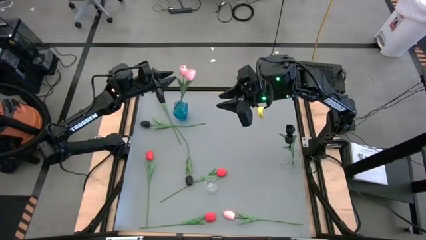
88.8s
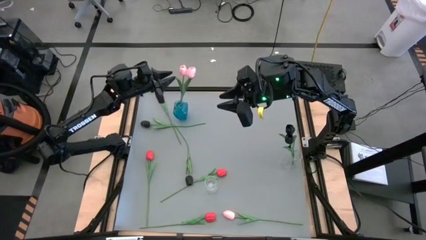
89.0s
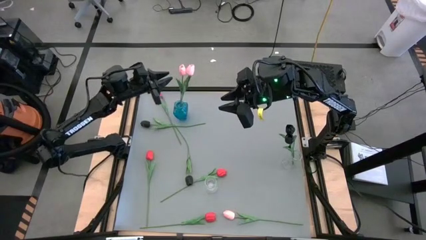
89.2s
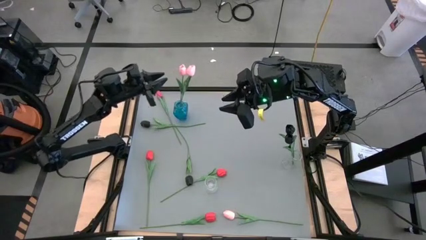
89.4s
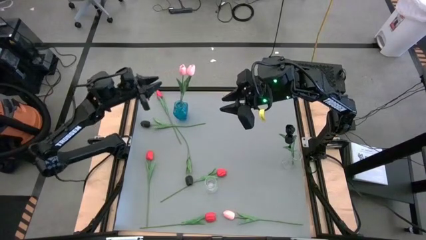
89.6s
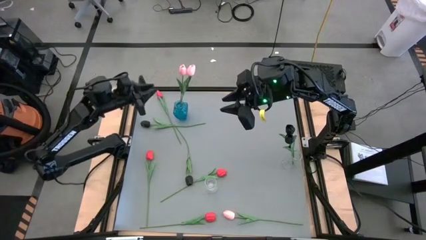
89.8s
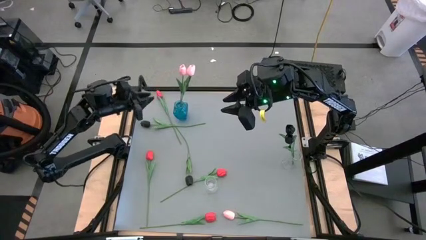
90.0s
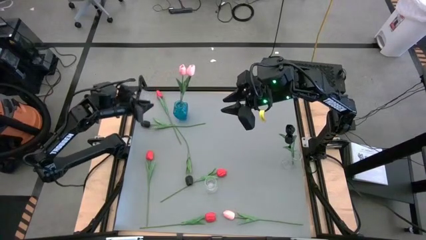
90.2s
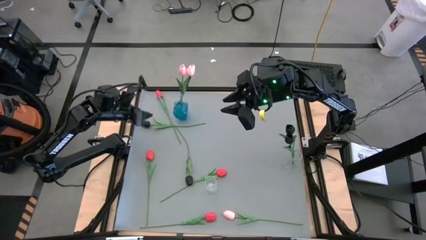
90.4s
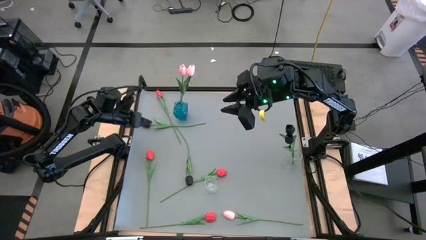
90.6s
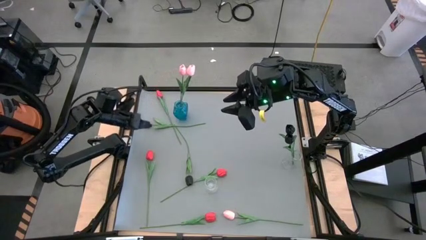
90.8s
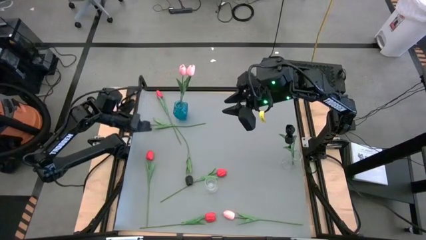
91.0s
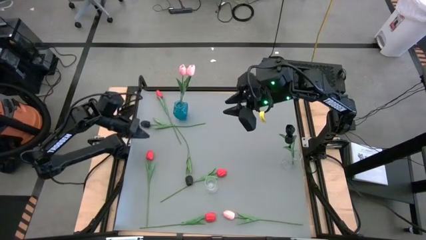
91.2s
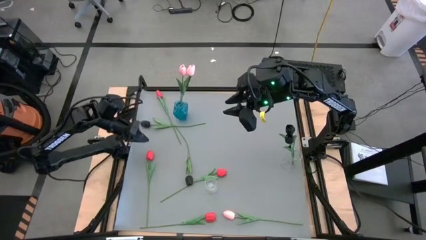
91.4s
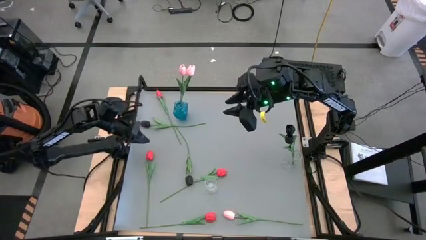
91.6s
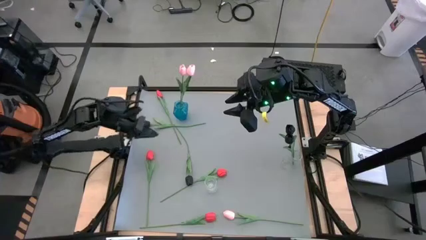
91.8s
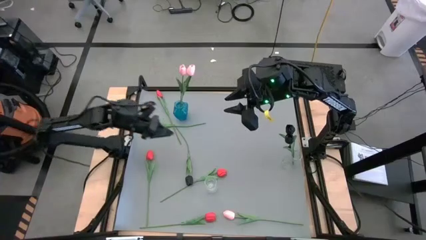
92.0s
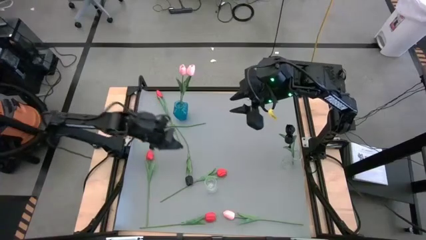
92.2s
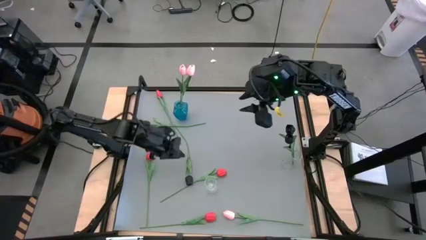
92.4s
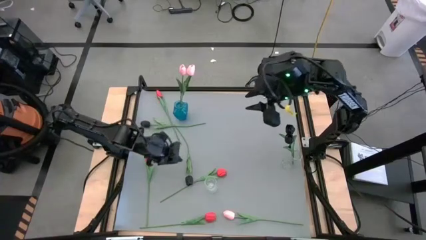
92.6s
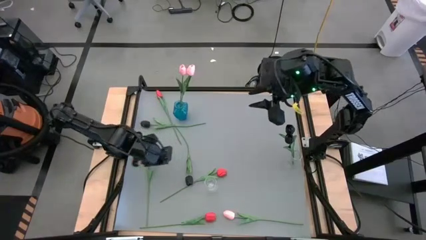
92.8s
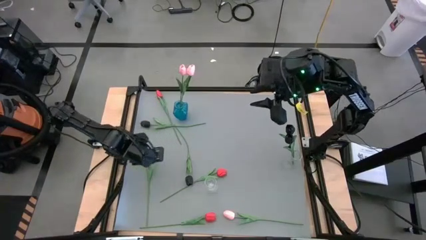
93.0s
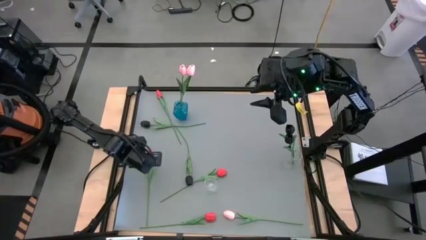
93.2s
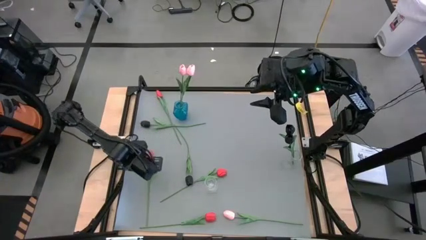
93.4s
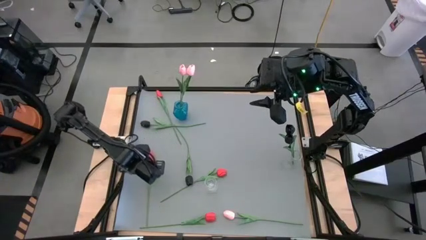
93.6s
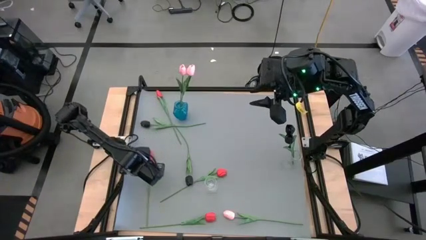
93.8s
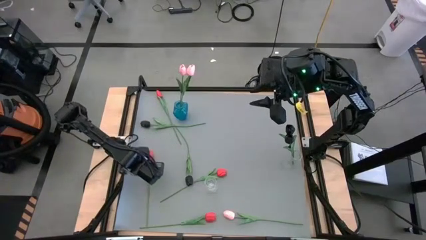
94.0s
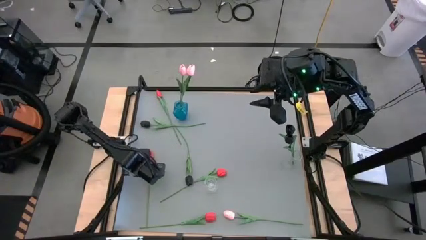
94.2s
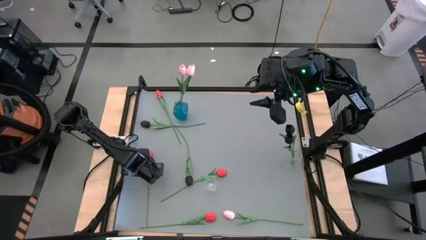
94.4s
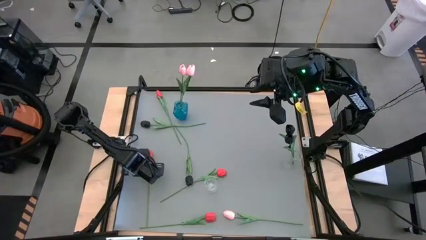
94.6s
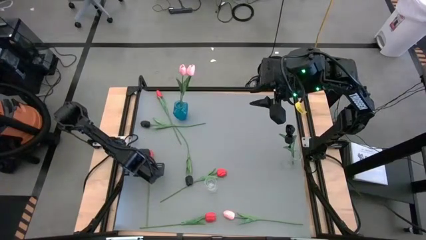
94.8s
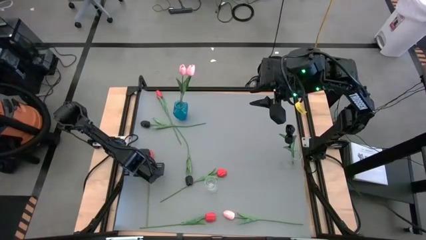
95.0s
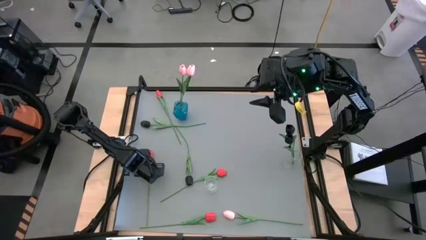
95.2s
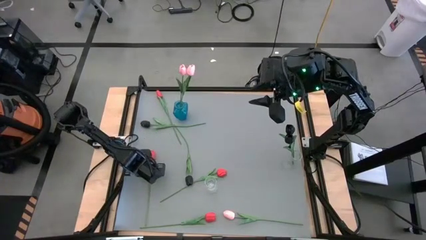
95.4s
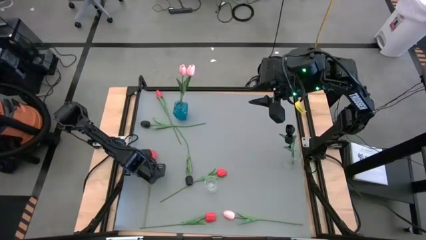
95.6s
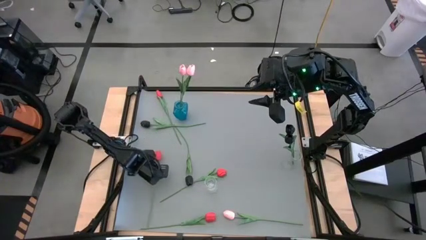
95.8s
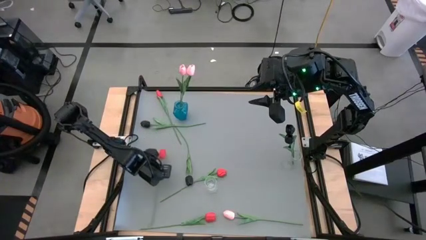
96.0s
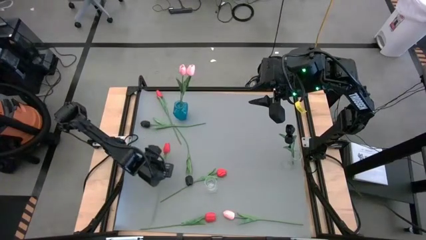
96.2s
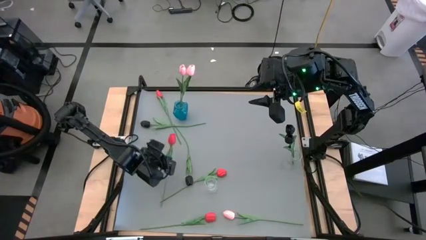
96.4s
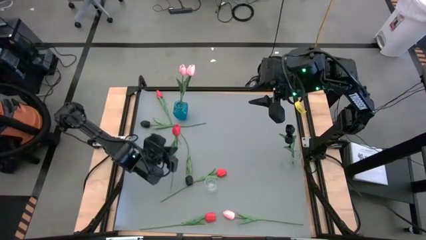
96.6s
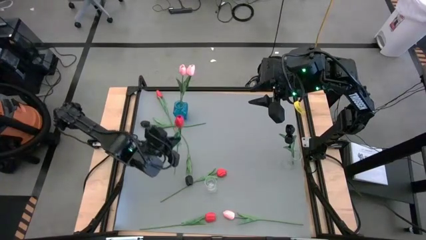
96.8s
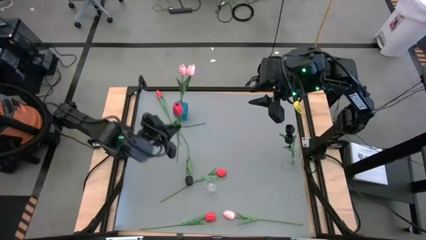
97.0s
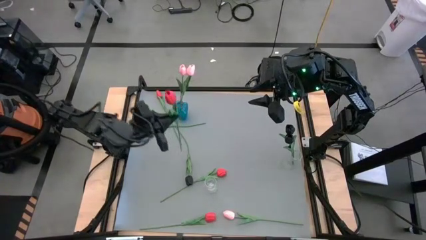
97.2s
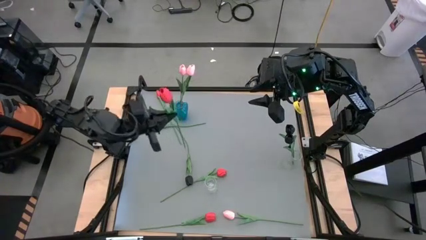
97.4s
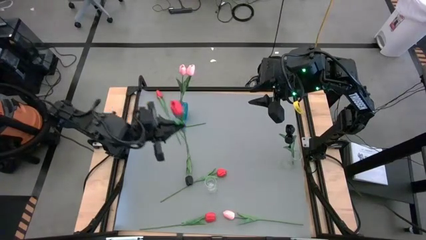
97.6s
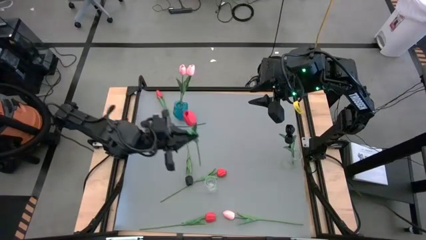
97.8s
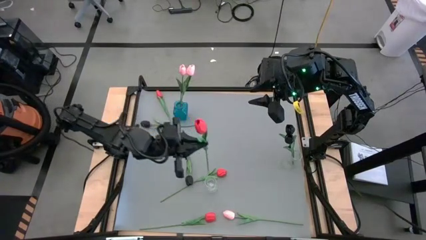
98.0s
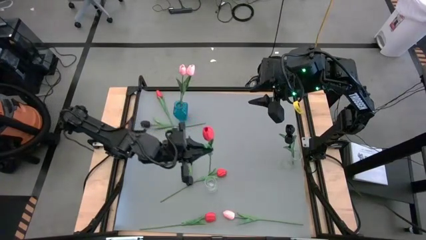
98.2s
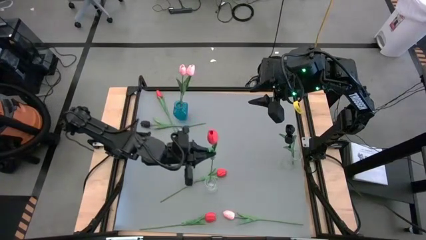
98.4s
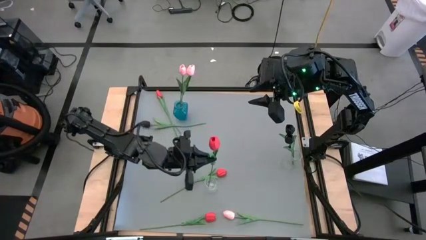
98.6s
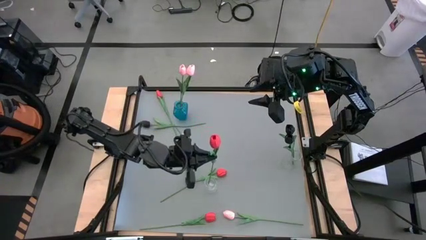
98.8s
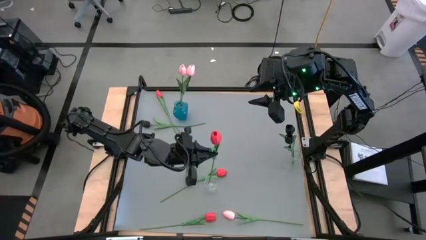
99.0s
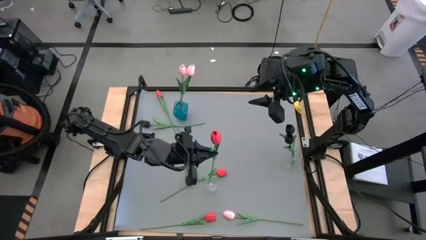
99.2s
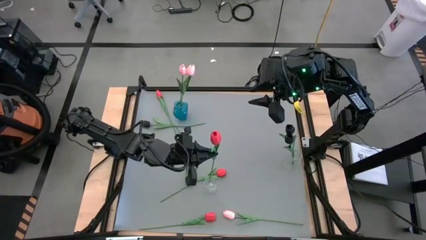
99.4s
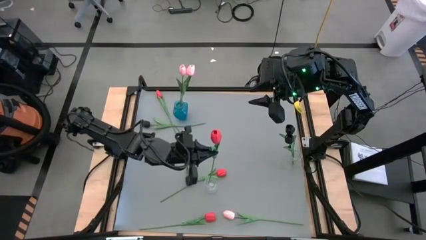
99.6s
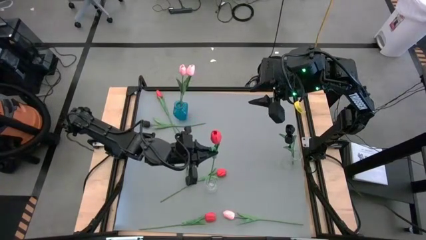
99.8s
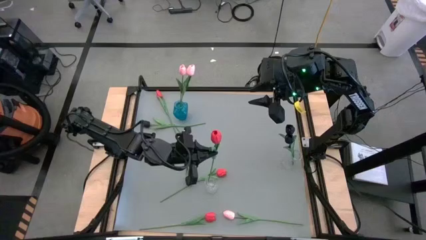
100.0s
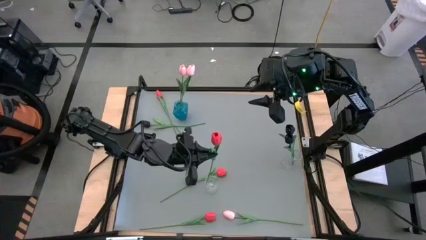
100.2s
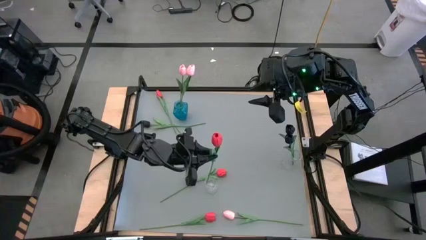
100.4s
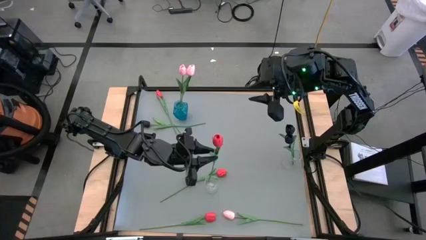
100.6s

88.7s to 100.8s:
Task: Sort flowers into vase by color
Put the red flower into the left transparent vase
